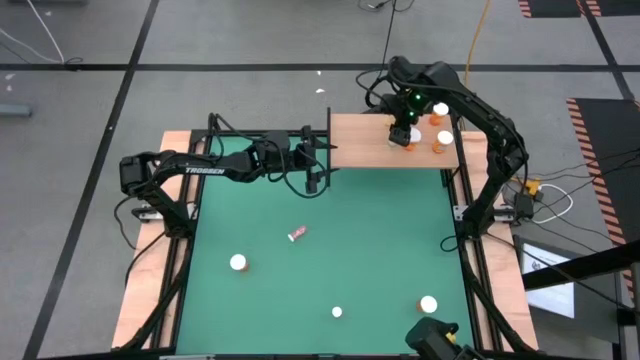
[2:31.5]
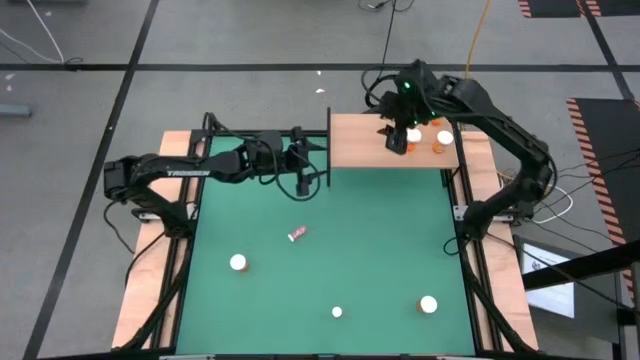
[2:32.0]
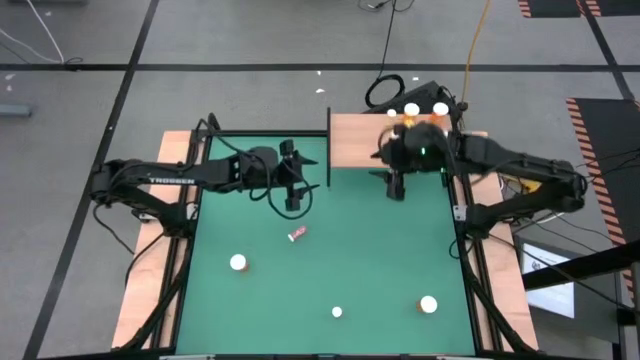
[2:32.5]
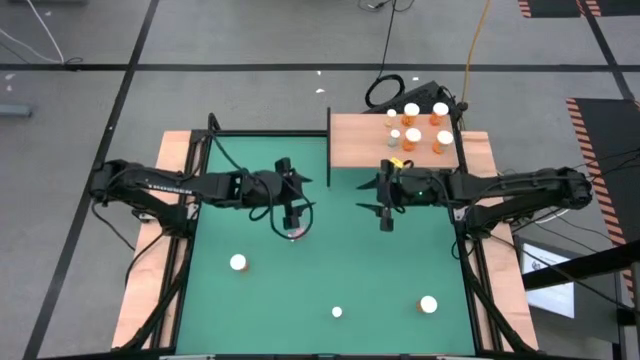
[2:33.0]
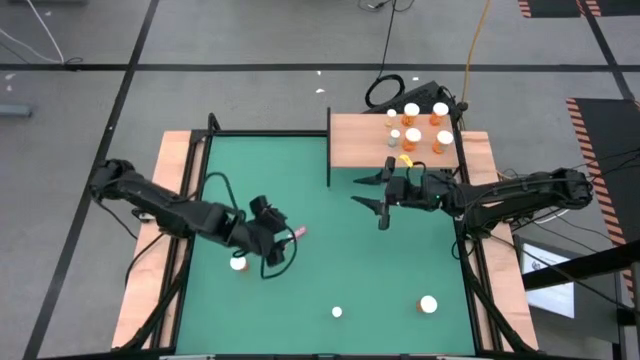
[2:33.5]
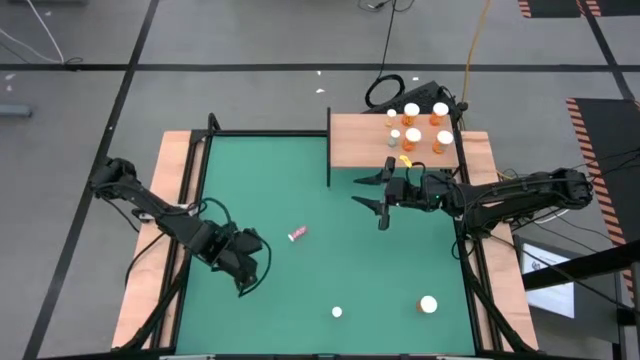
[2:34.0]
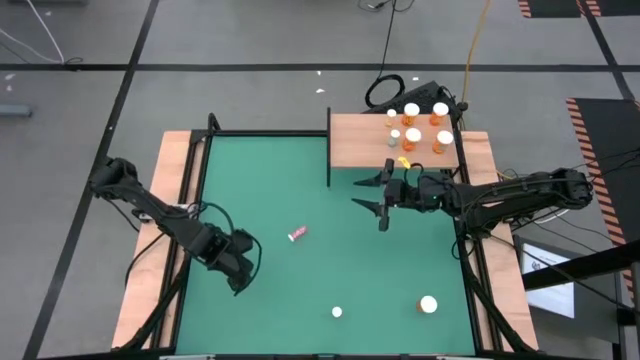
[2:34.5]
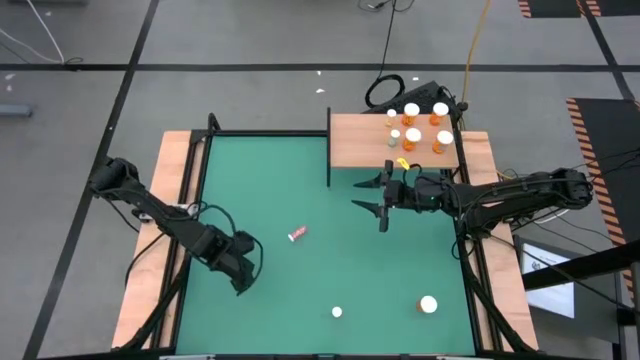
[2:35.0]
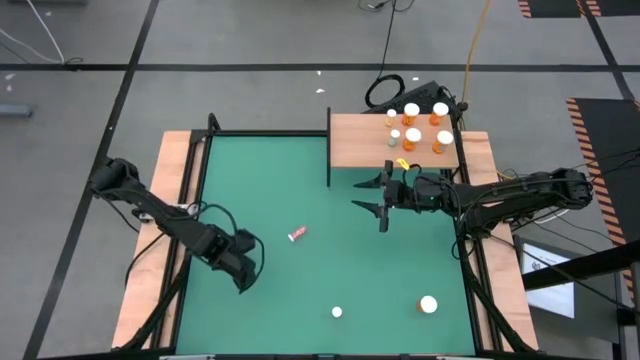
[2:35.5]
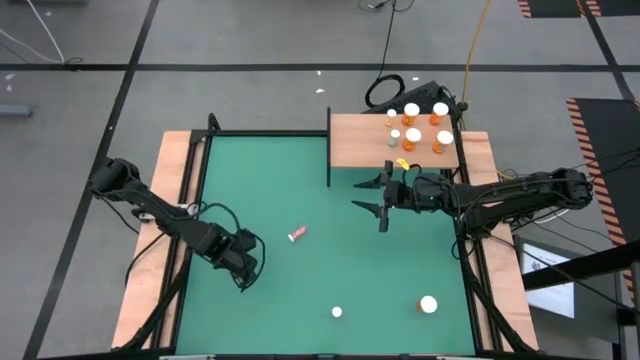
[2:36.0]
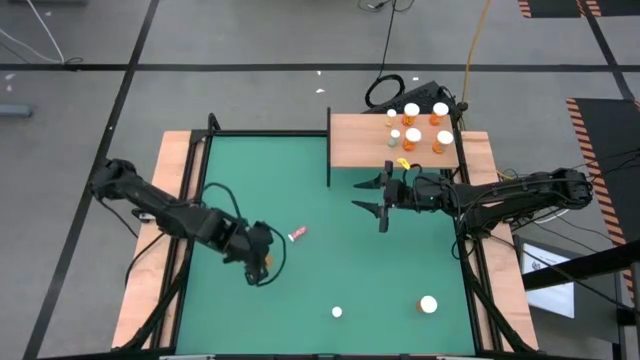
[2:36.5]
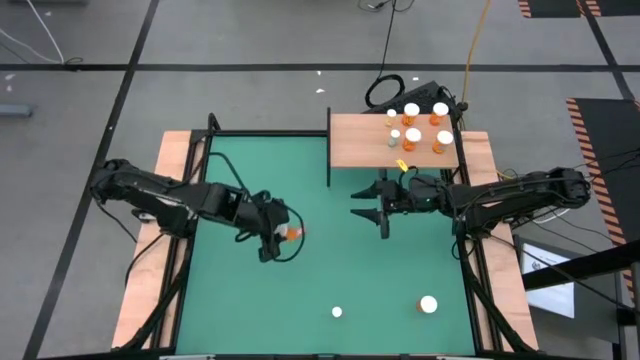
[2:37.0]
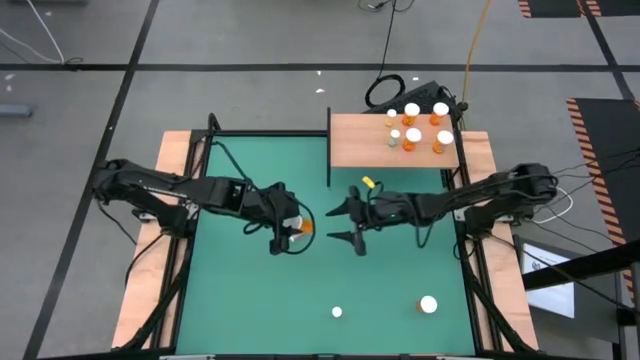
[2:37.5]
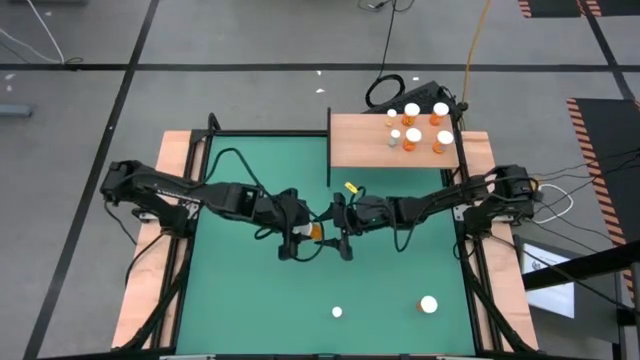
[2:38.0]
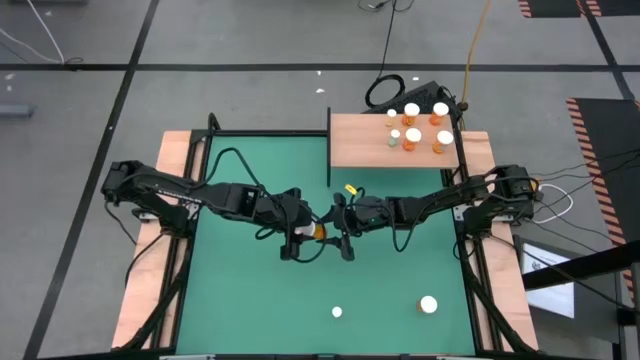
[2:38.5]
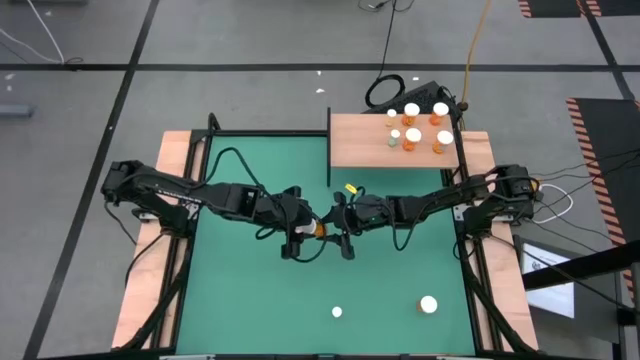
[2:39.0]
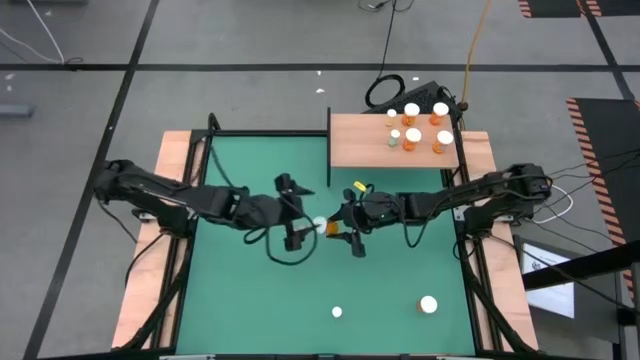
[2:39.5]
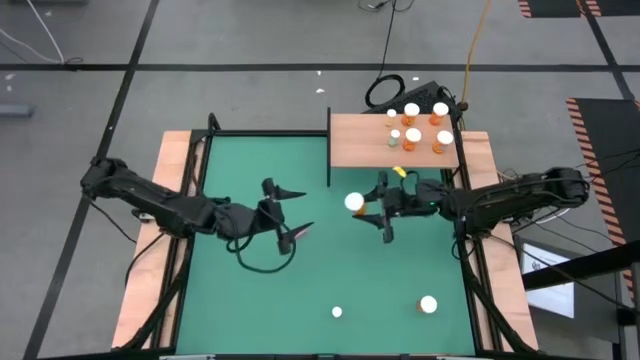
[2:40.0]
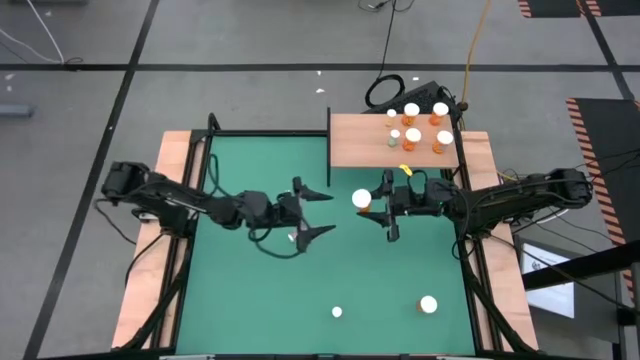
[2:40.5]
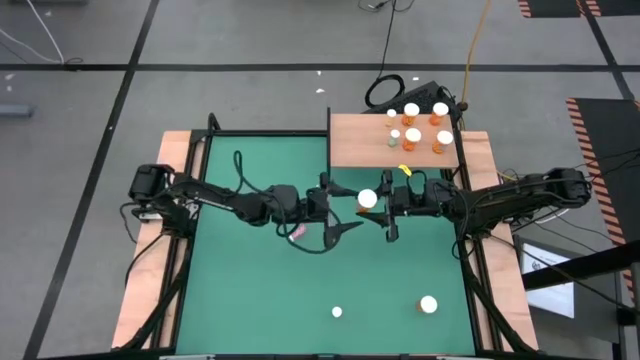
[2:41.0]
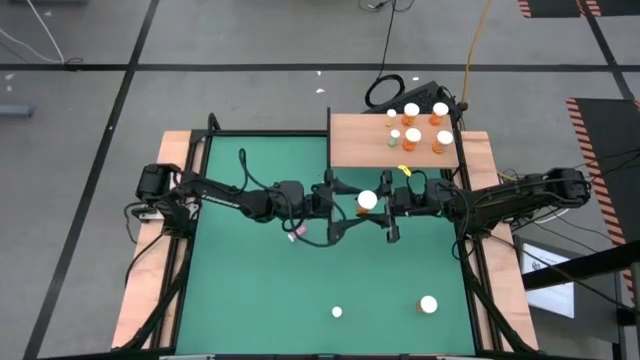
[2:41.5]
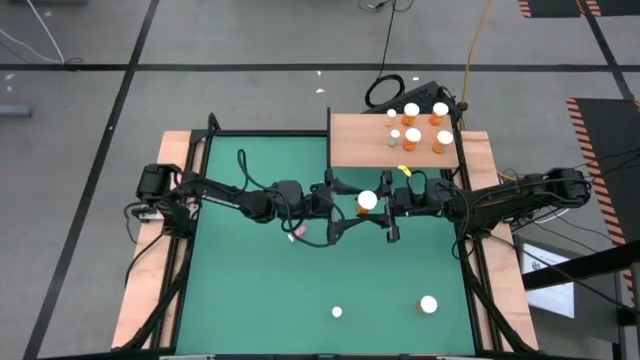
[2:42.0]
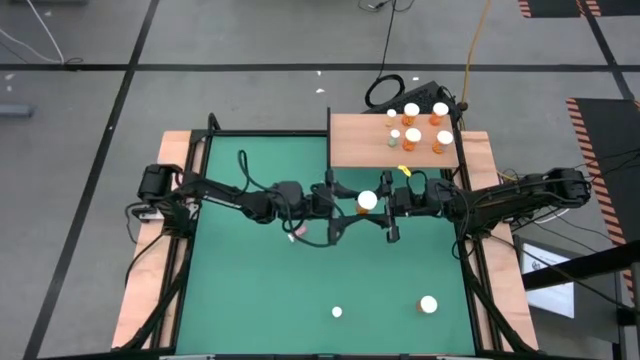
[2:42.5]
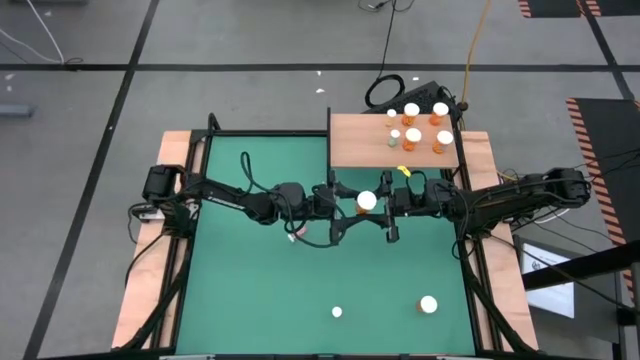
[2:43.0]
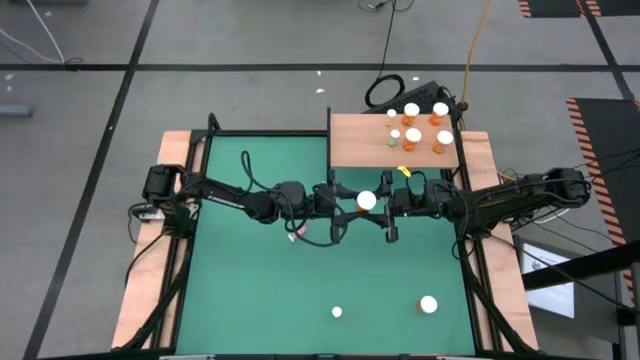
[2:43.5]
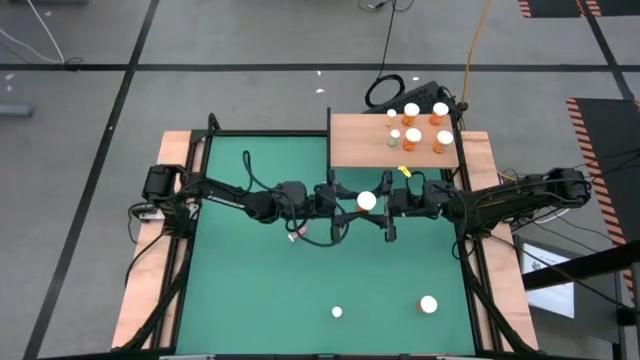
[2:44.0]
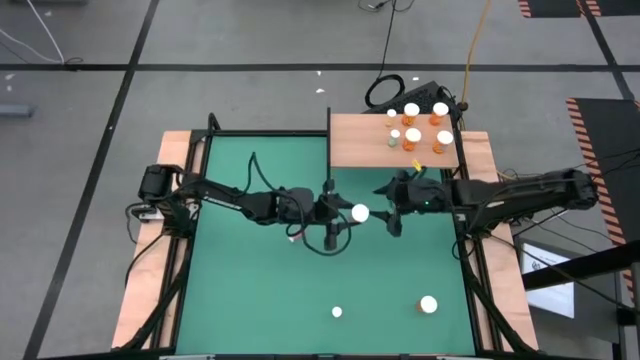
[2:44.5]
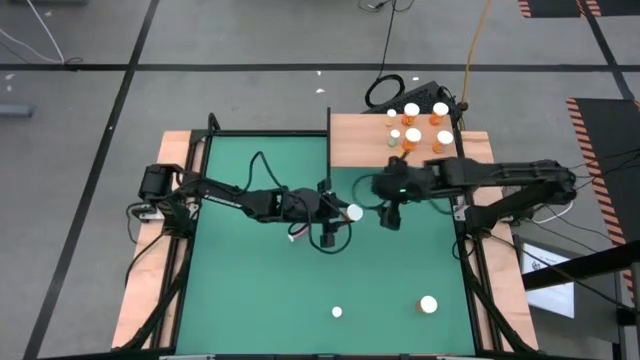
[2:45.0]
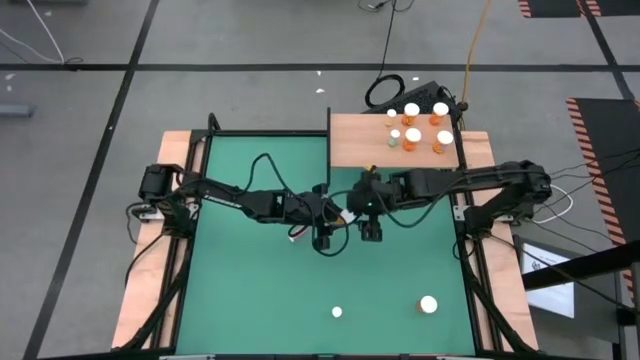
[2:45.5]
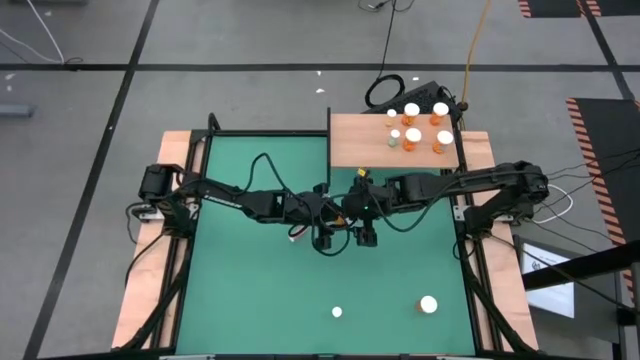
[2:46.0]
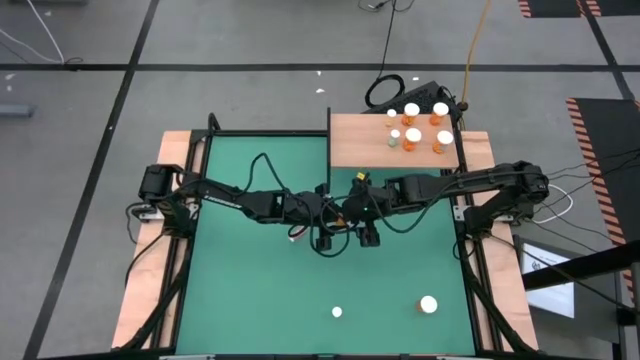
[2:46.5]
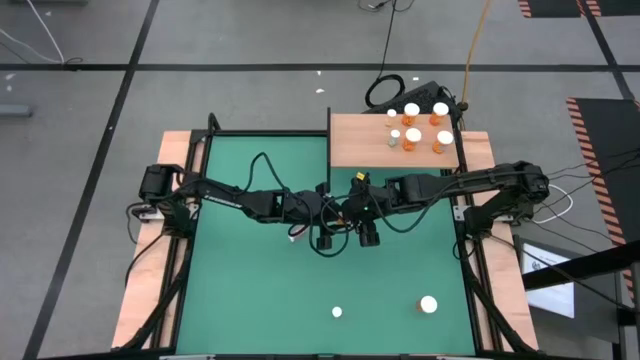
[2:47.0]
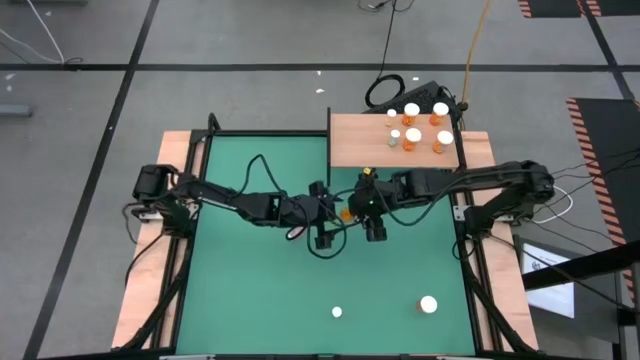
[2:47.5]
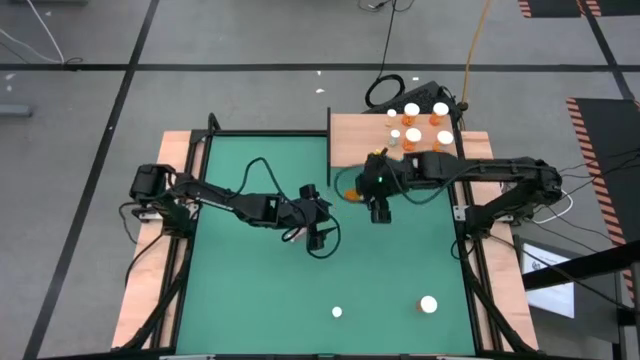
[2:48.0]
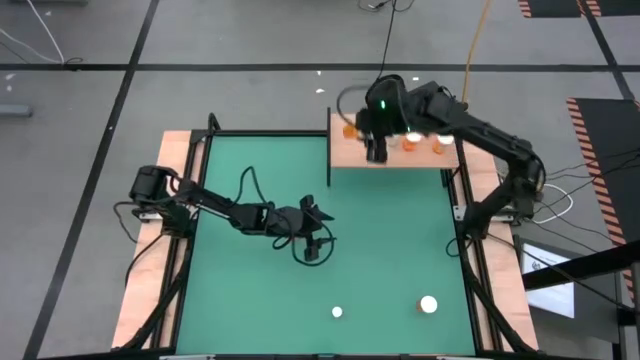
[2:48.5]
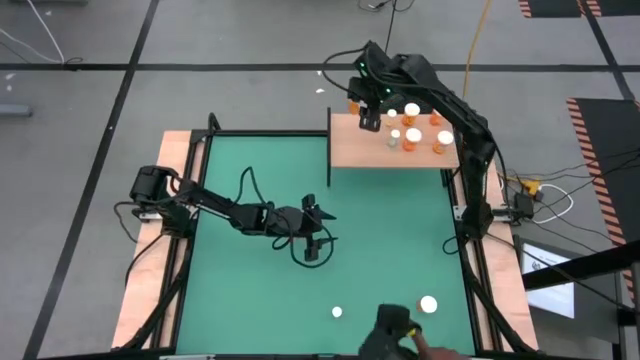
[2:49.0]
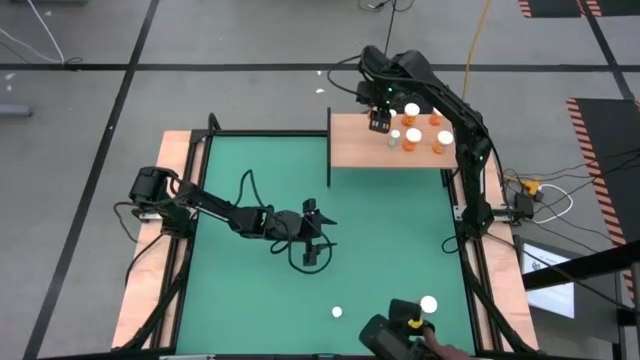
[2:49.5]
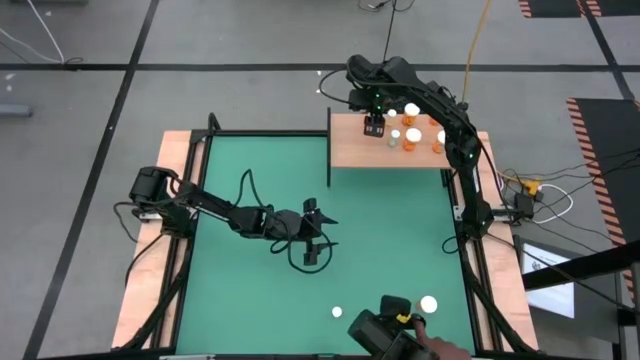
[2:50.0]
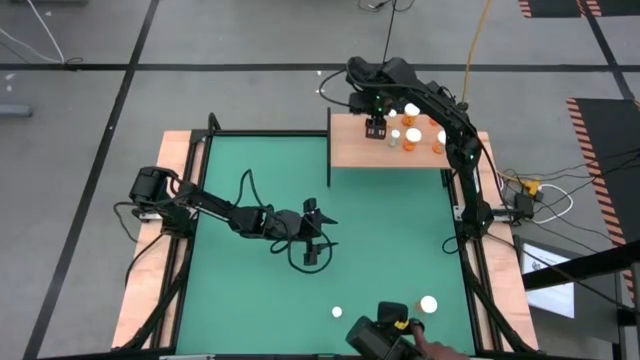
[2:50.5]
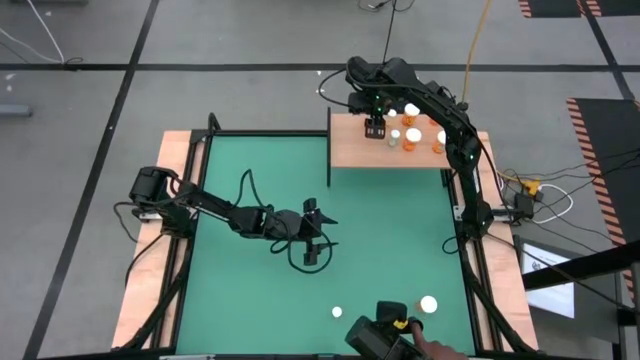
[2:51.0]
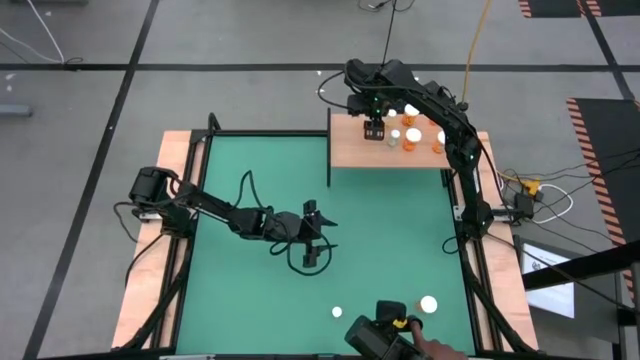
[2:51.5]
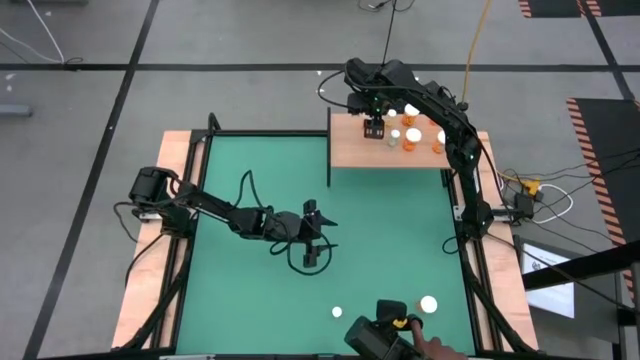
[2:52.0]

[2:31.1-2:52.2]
Task: Pick and place medicine bottles onto shelf by color
Put the orange pill bottle on the shelf
